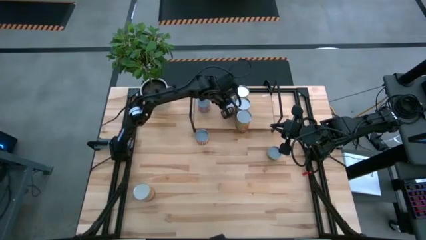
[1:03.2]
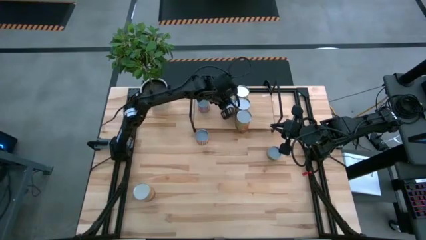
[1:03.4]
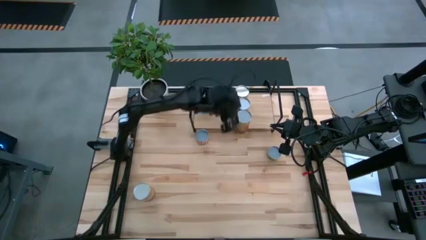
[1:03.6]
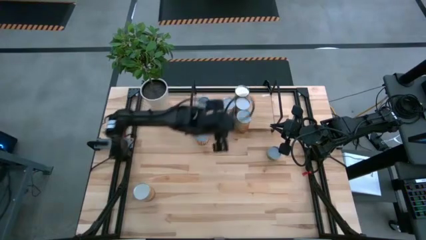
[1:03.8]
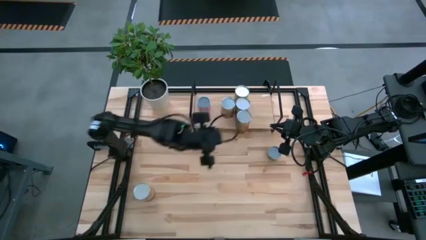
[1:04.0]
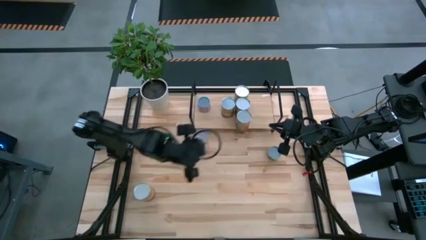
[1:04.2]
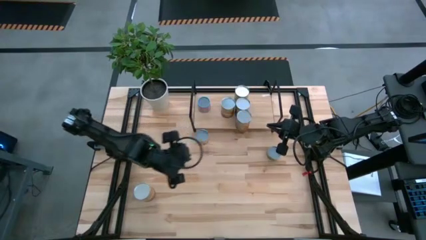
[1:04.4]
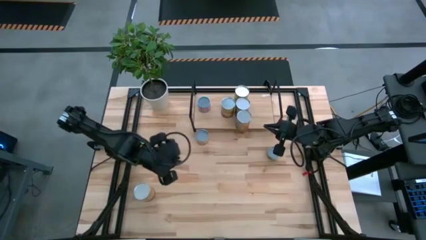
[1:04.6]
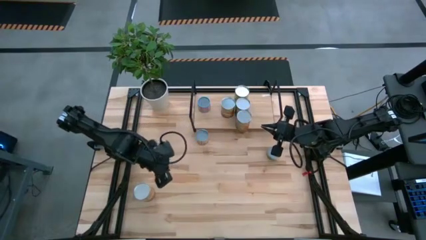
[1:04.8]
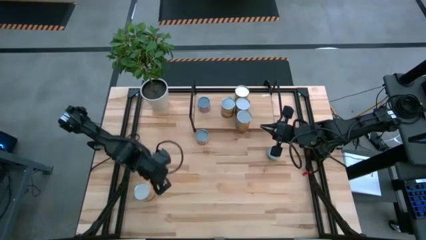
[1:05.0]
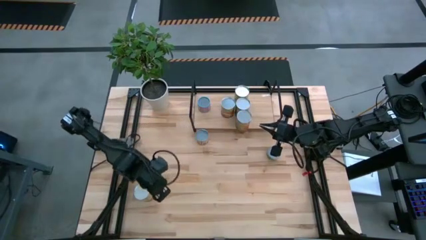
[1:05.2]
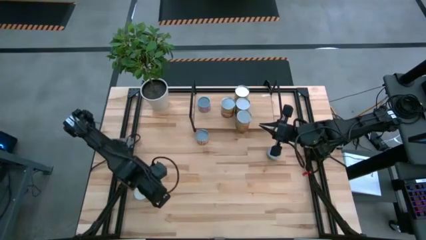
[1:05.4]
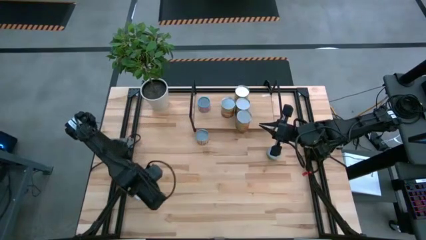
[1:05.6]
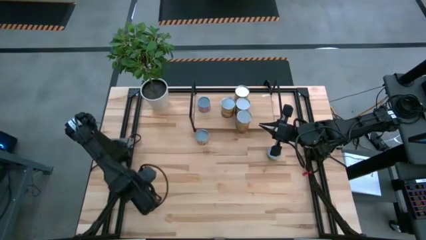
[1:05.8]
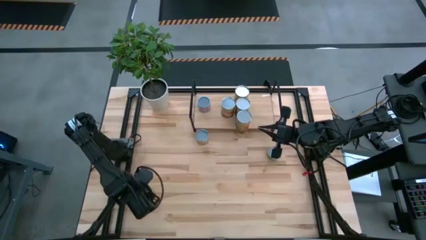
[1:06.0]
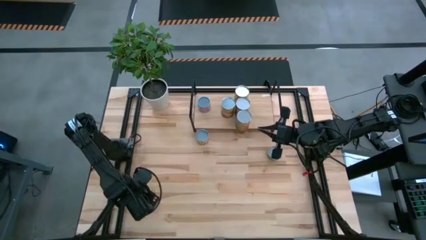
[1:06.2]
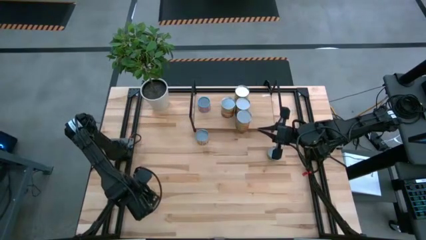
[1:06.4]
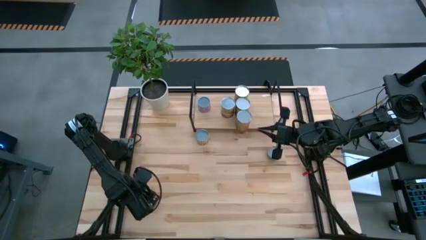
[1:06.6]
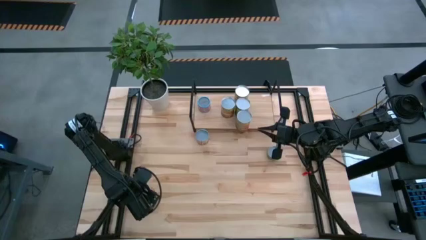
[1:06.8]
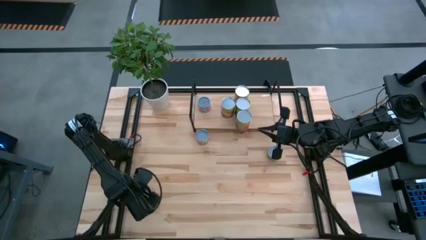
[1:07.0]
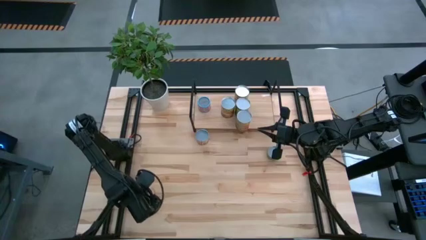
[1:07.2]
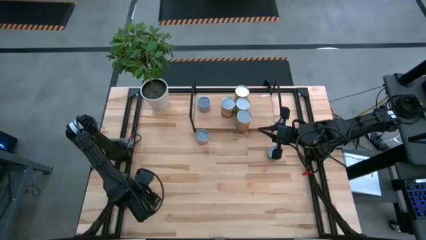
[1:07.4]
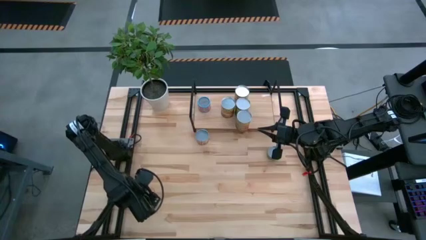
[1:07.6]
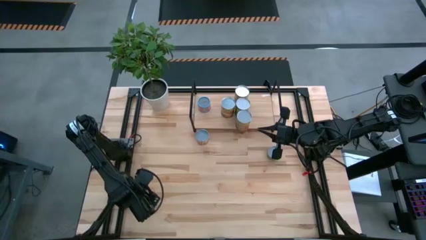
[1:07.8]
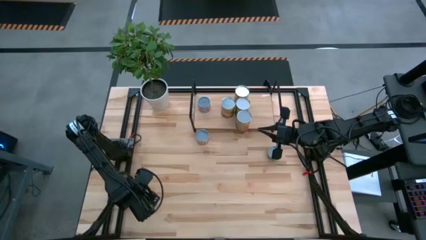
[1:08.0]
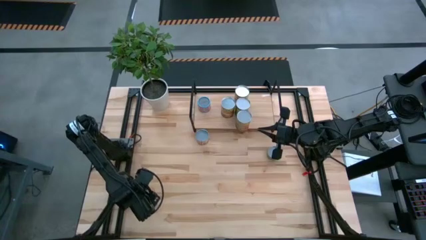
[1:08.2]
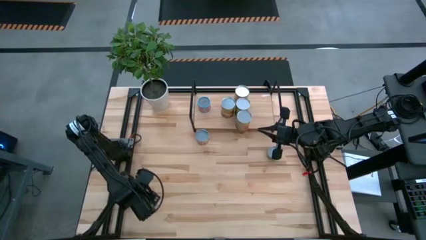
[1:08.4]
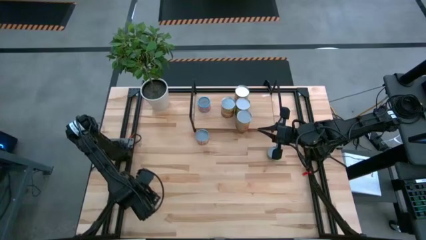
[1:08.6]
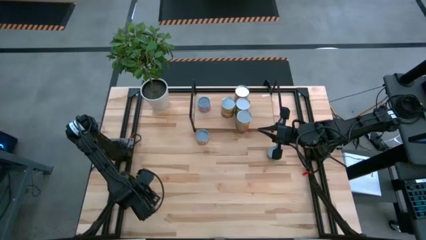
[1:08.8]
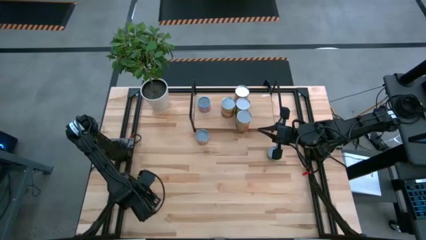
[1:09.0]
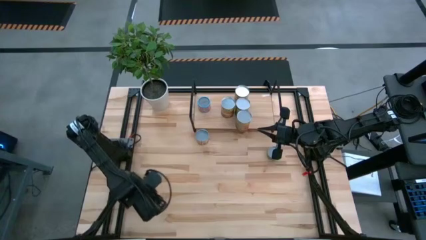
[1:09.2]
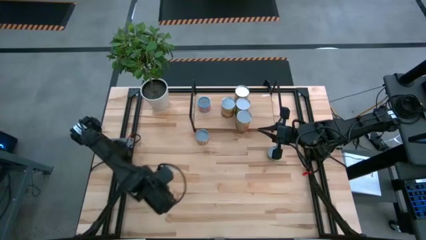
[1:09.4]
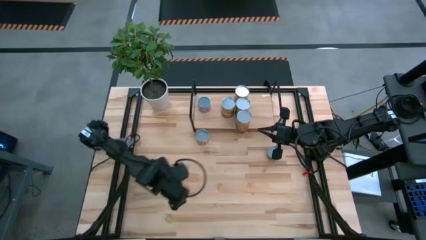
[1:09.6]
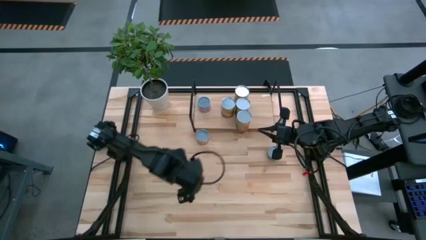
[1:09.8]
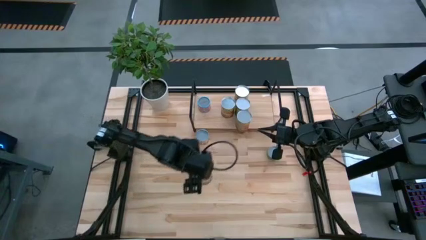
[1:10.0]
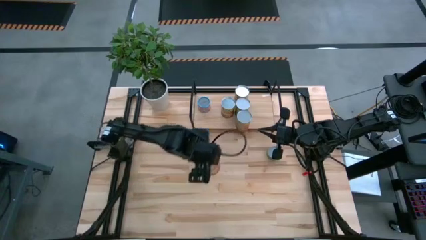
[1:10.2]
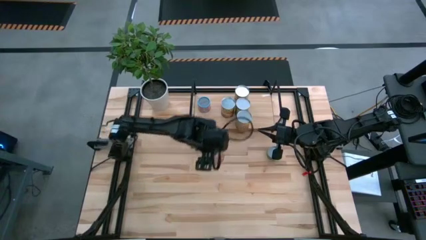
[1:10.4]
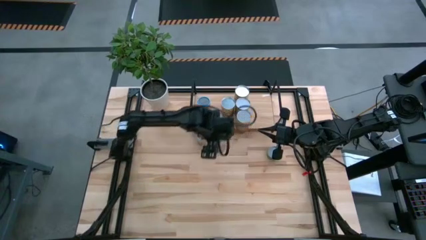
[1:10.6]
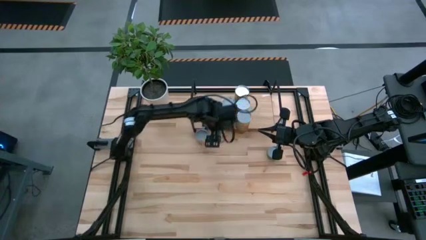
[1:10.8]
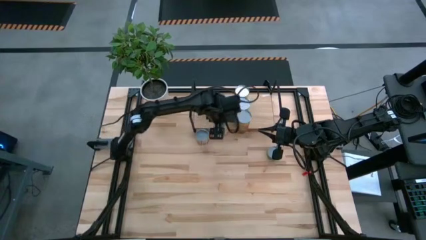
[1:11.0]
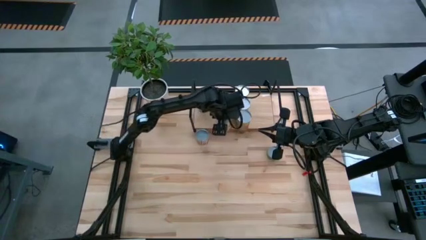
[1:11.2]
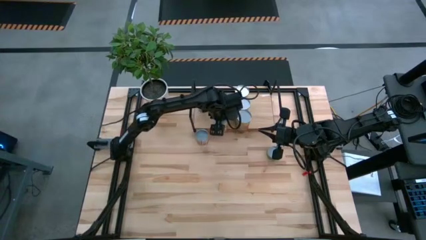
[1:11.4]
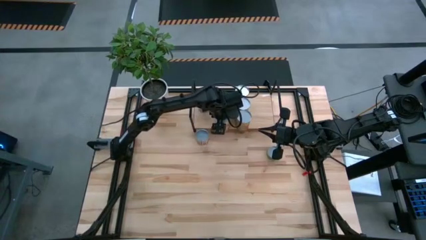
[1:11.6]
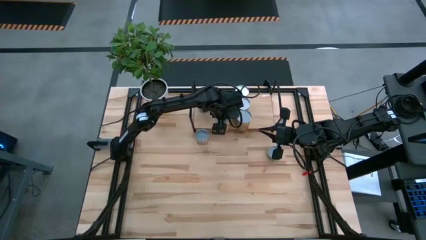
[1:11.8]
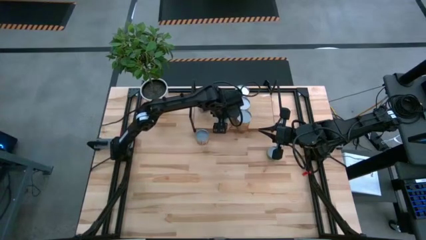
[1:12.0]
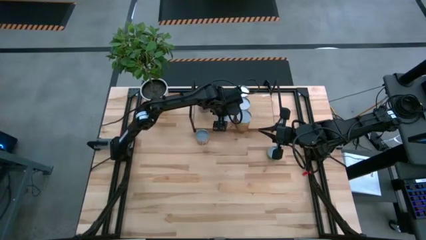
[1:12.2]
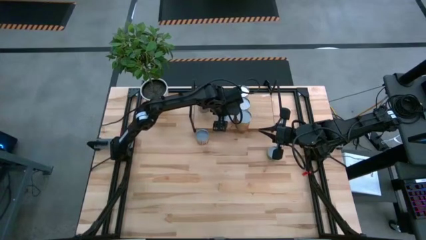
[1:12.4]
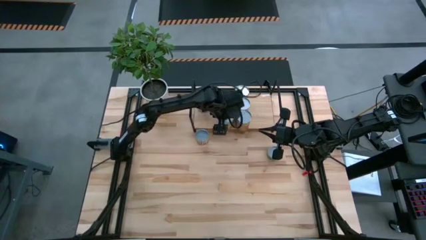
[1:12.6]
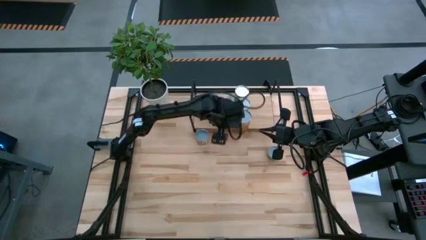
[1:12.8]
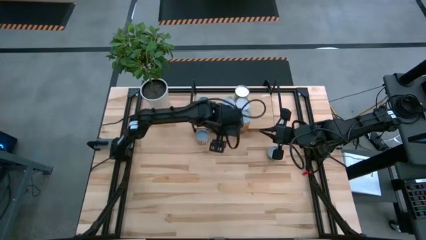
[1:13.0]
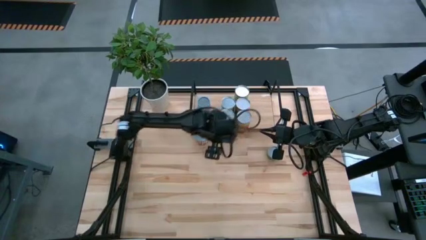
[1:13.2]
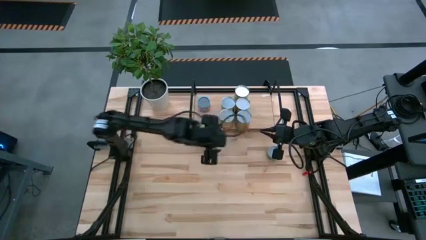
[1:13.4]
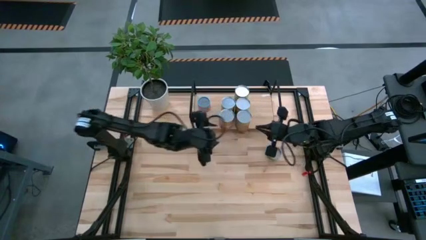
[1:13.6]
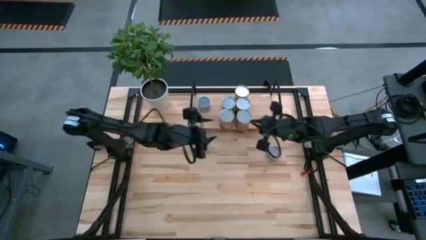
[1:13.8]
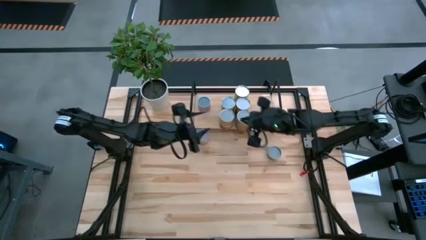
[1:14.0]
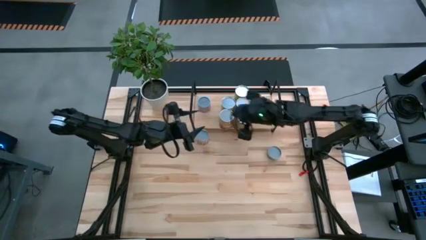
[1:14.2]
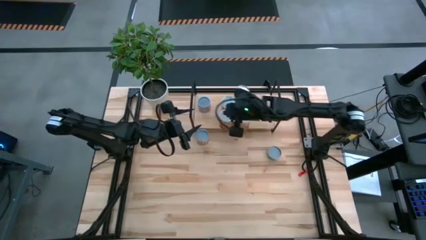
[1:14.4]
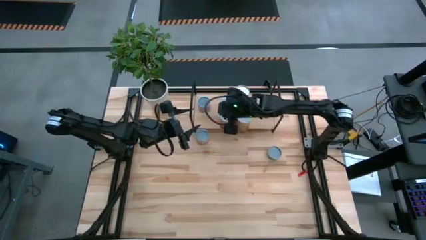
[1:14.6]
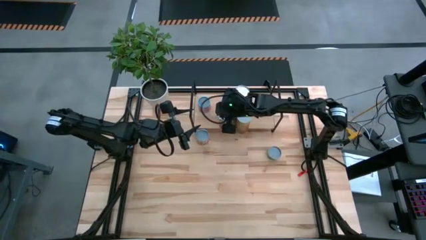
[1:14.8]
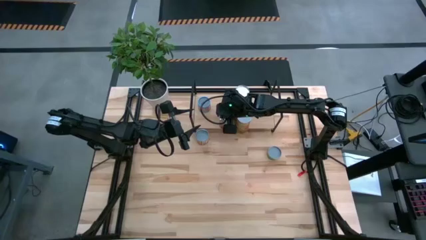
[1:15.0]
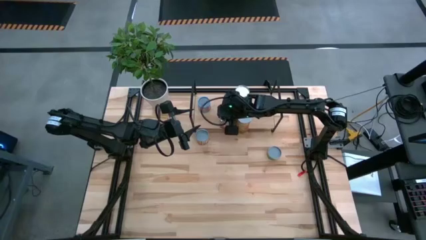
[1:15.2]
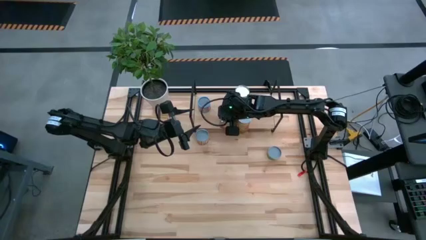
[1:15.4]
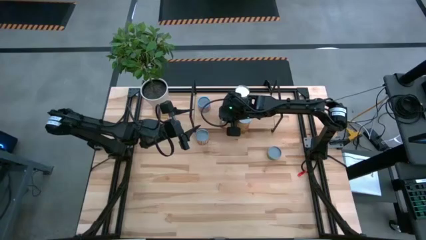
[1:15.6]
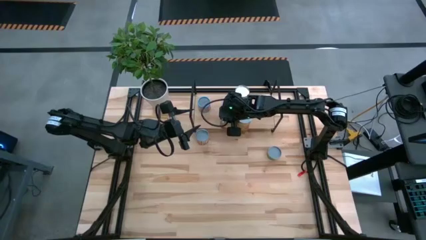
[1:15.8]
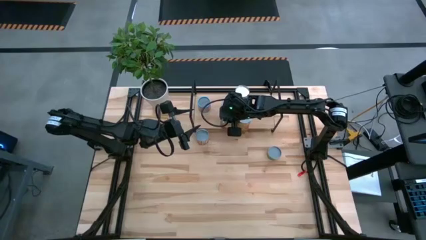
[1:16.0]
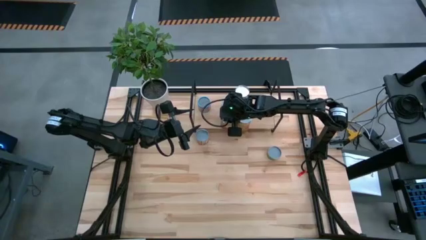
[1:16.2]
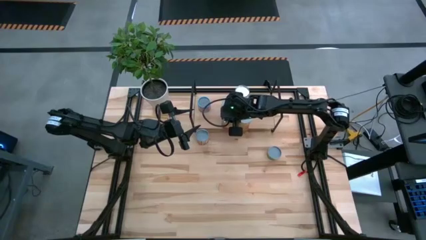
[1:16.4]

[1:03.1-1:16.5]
Task: Pick and place cans onto a shelf
Put the canned corn on the shelf
